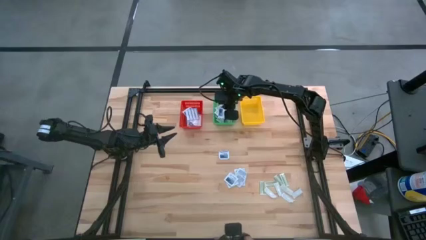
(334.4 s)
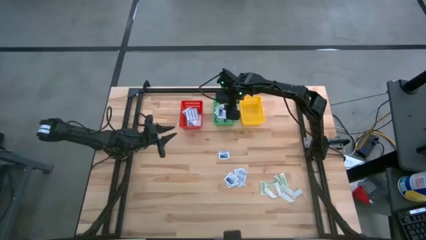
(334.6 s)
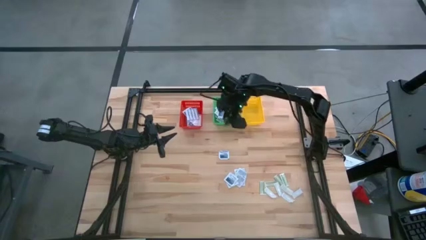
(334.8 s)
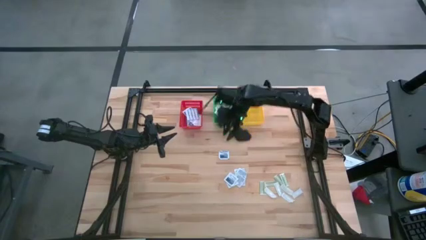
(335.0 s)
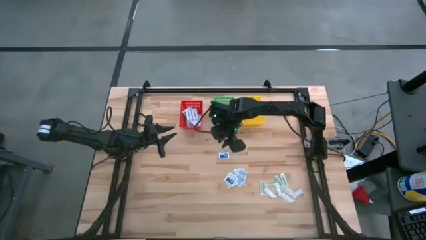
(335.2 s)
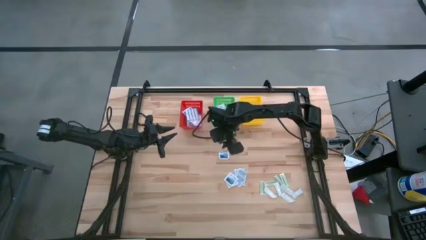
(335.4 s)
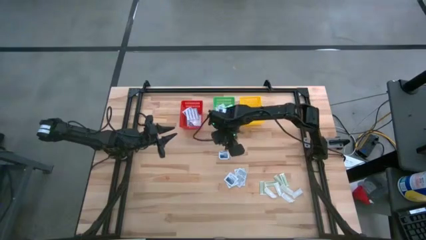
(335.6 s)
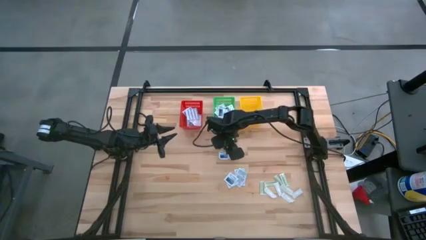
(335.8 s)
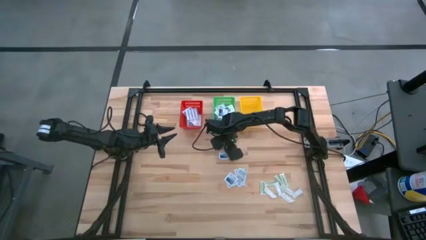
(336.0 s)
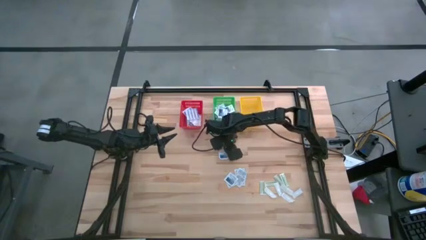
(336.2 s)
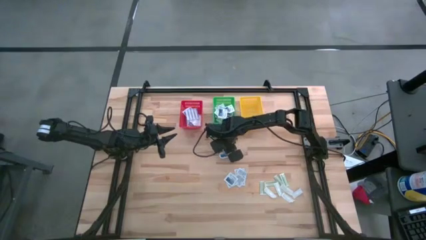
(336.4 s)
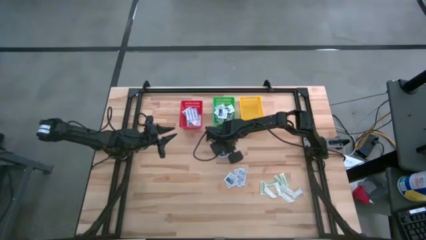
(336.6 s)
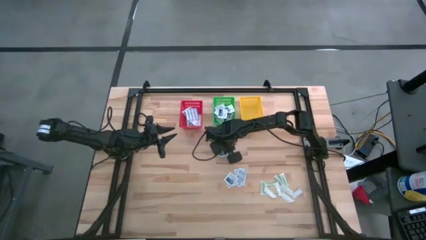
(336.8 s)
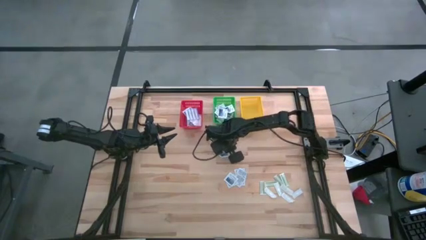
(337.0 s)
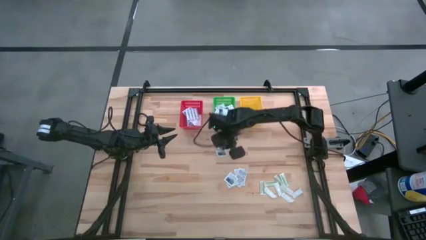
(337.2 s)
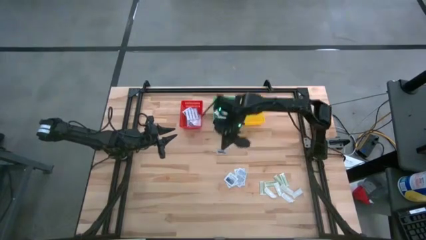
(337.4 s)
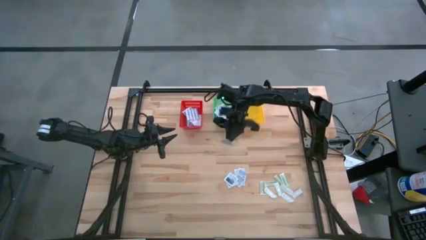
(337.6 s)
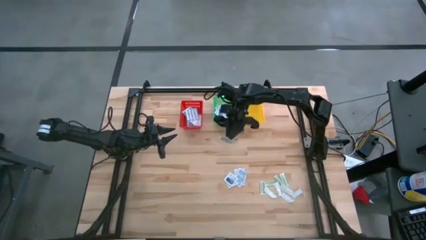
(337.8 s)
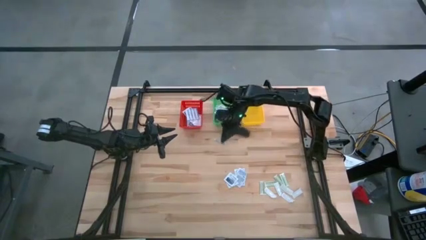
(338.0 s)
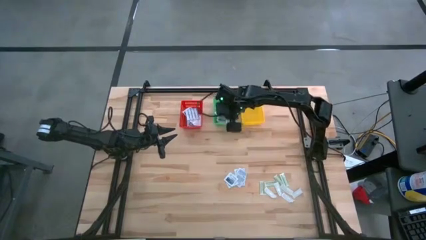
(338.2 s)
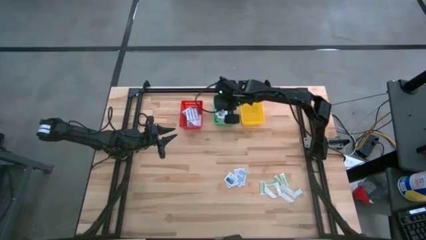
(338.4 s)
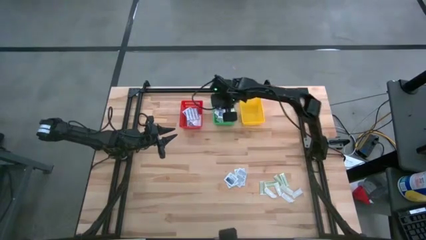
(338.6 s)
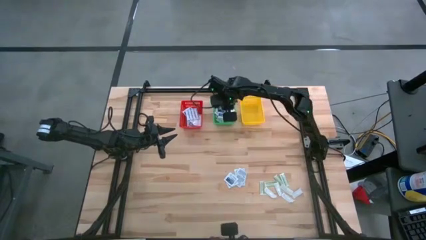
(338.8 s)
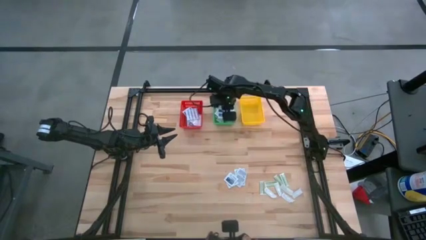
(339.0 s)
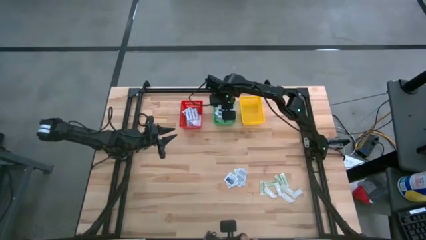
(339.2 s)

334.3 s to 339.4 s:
Task: Pick & Place First Aid Supplies
Put the alcohol pad into the green basket

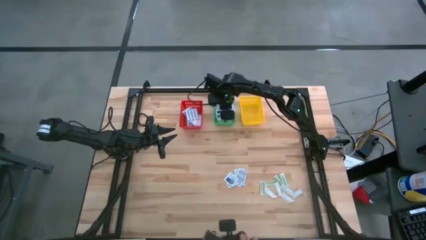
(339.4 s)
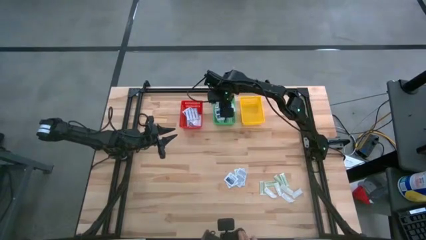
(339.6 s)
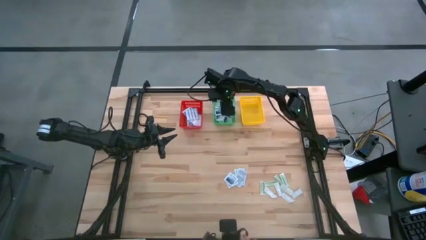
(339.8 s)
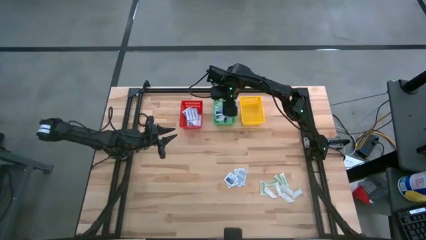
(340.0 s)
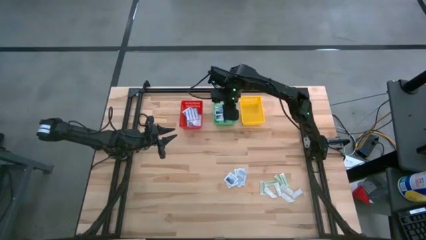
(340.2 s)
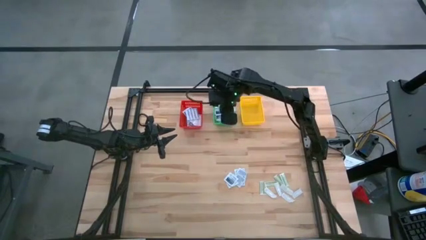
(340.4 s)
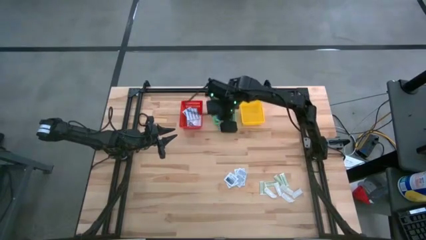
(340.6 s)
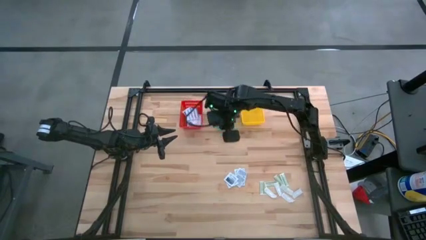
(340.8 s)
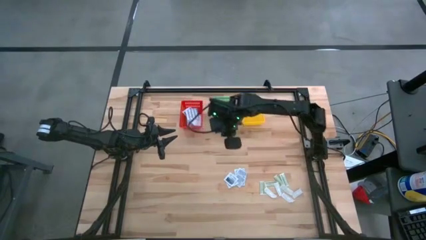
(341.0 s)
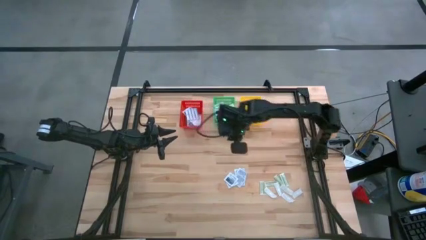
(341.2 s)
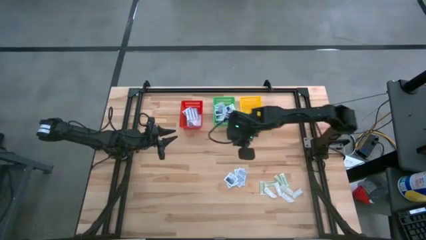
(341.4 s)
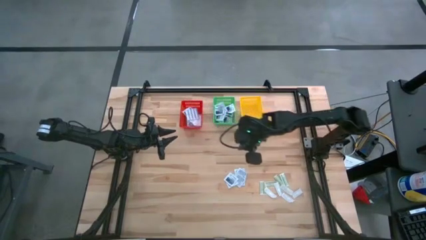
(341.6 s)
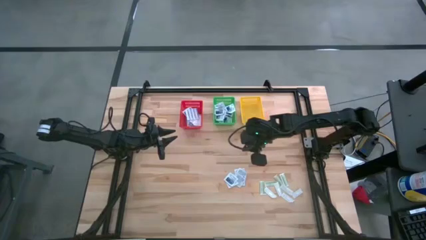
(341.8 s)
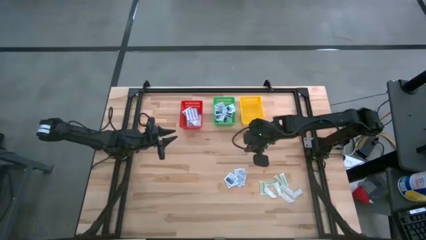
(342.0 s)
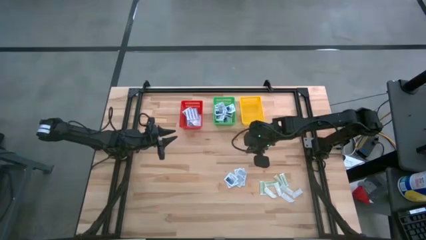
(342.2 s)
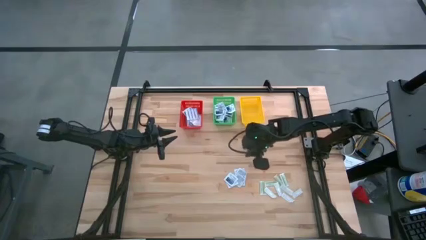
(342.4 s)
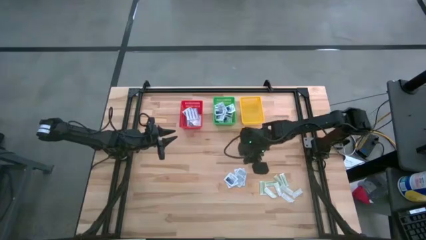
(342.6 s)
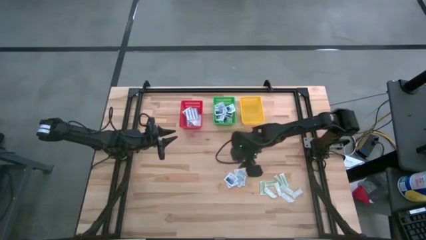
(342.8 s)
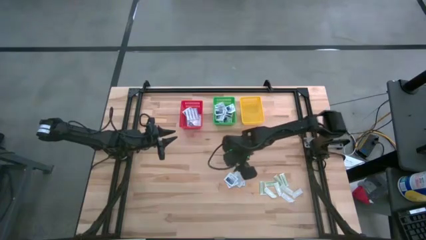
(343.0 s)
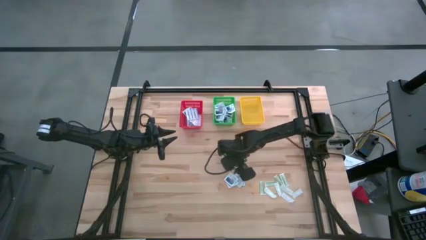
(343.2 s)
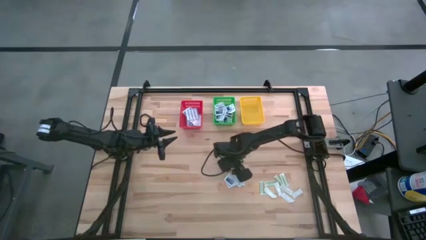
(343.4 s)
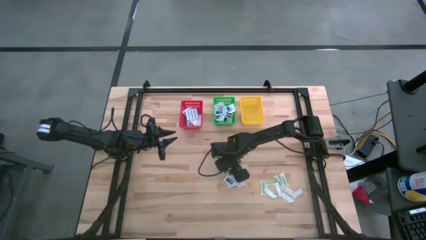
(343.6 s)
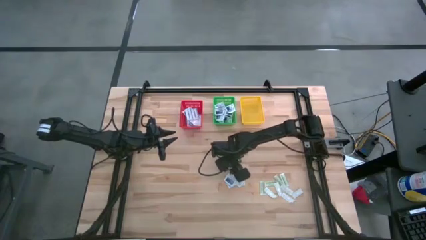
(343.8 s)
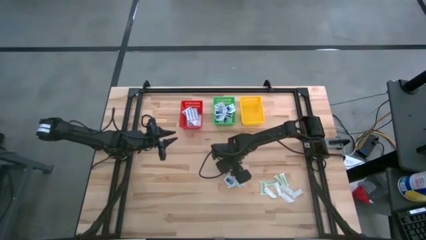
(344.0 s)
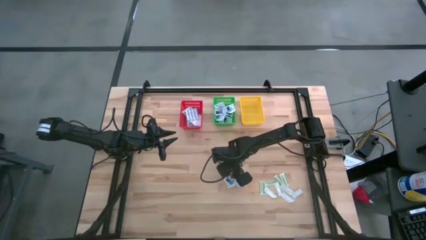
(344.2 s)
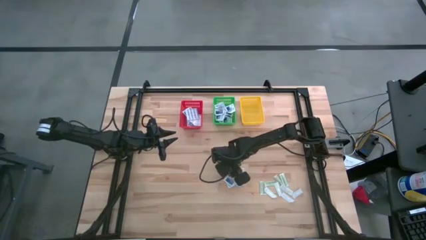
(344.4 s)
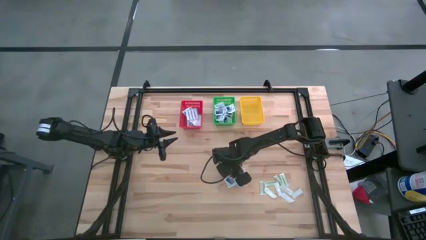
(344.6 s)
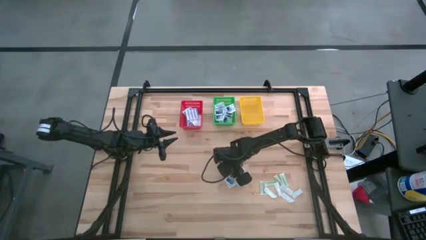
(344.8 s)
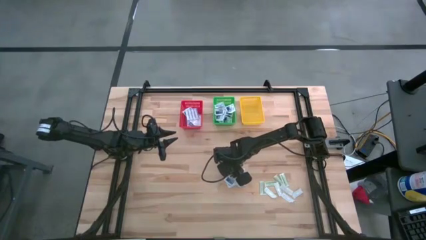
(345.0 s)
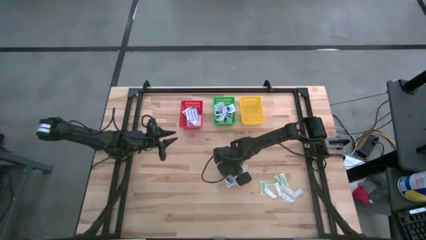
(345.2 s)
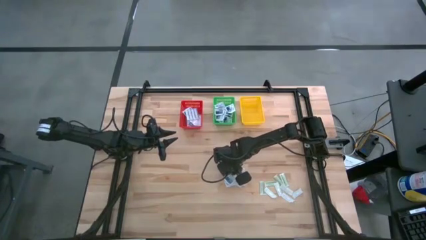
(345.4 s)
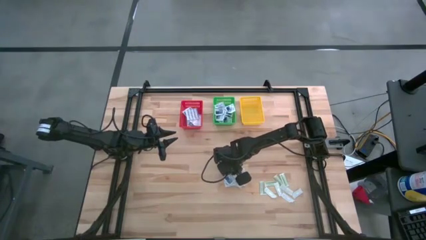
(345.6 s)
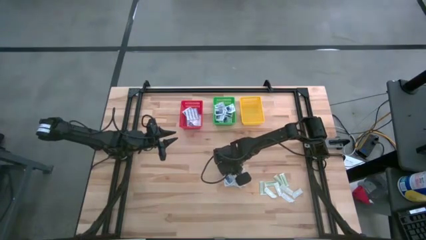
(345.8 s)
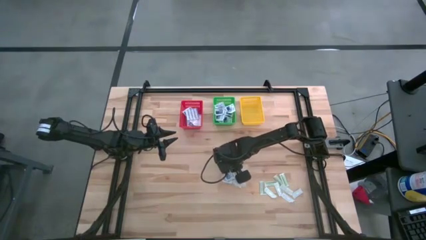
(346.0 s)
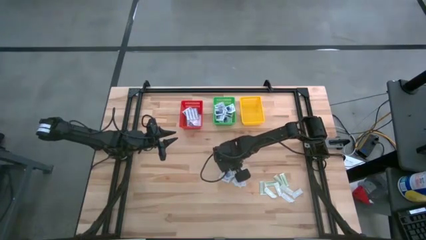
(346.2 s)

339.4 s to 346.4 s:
Put the alcohol pad into the green basket

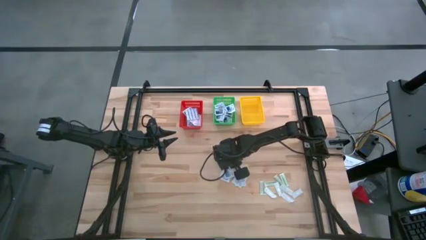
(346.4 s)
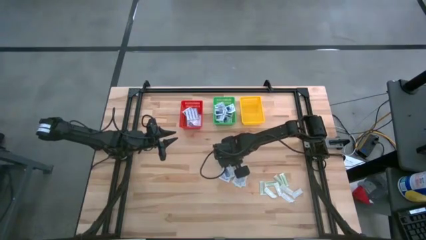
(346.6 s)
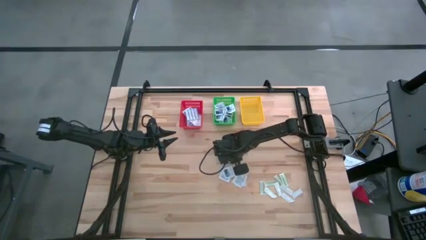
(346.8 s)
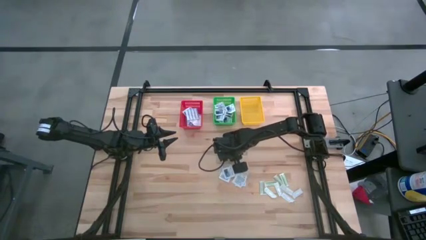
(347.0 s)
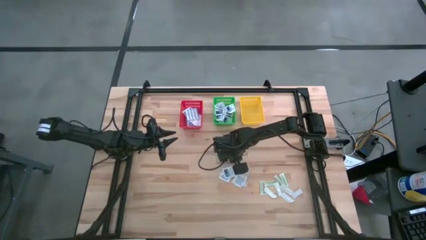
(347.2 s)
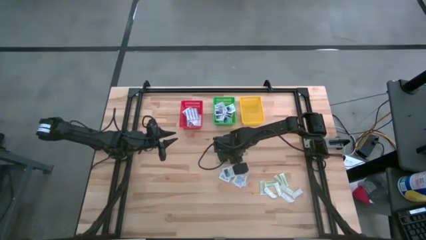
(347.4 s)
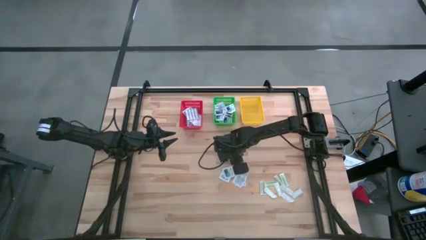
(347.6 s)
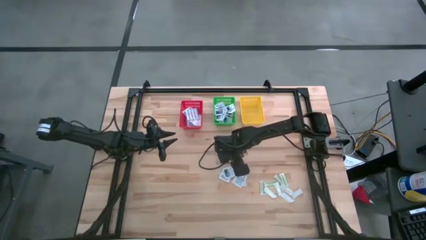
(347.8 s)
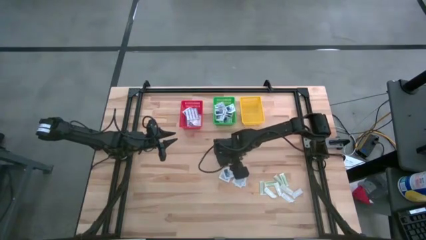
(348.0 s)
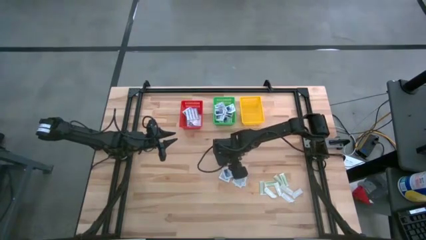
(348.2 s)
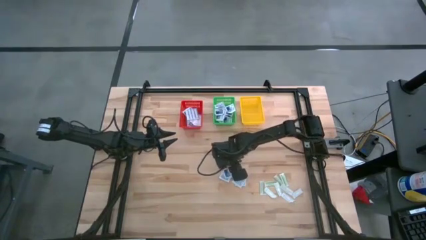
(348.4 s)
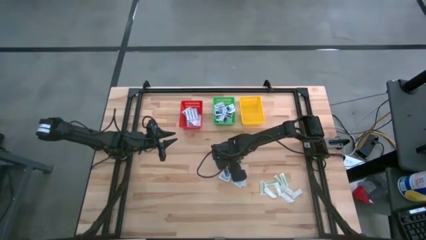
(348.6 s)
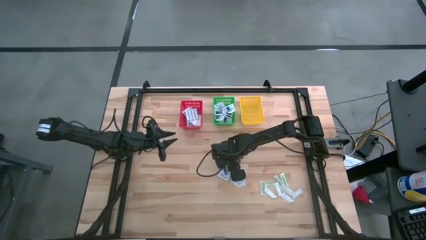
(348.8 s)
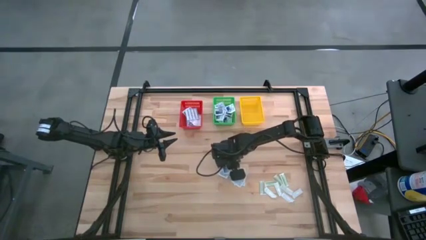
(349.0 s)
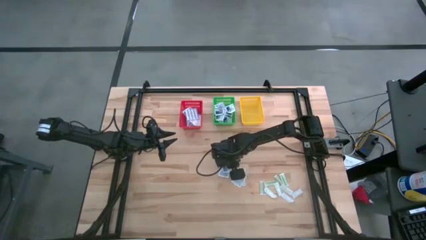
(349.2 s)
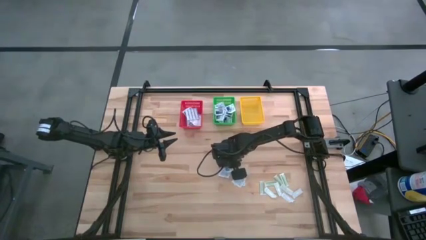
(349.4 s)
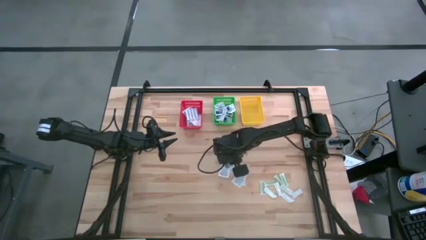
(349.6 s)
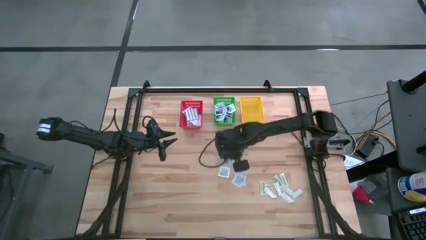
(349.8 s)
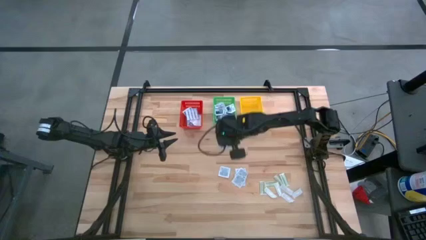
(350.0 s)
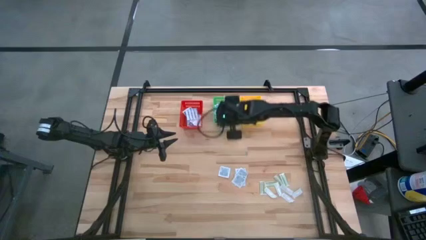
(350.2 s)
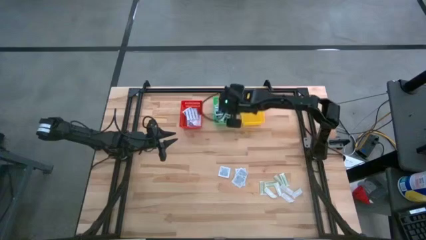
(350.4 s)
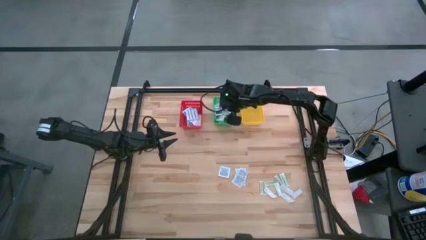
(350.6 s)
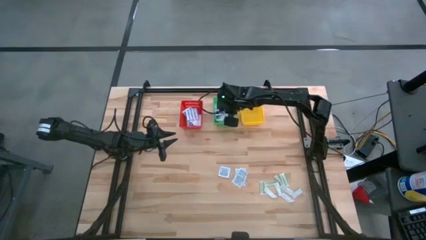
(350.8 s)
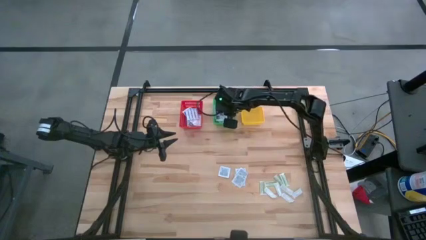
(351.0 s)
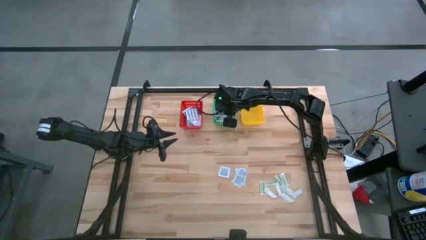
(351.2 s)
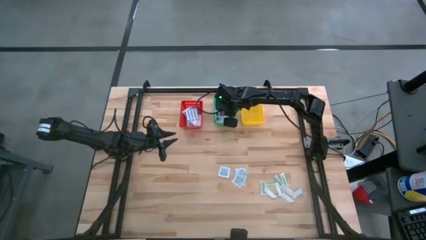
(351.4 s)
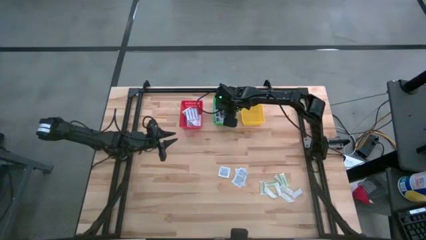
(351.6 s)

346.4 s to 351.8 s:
Put the green bandage into the yellow basket
